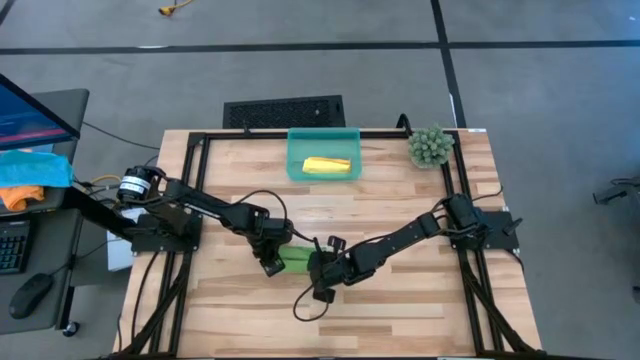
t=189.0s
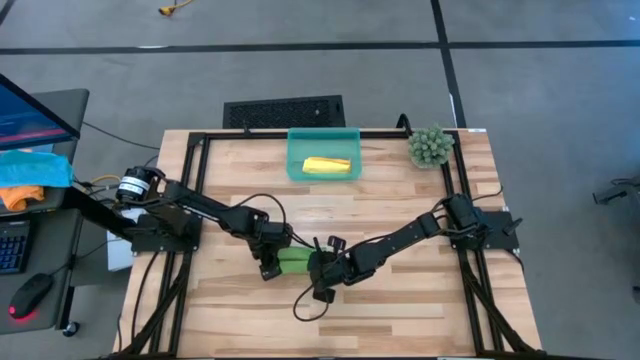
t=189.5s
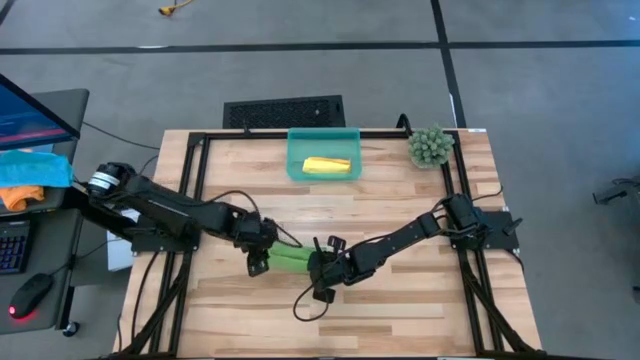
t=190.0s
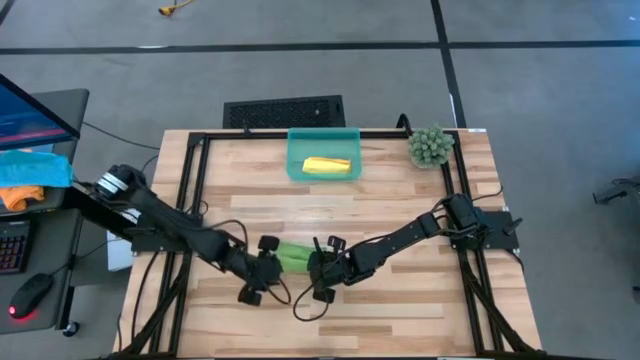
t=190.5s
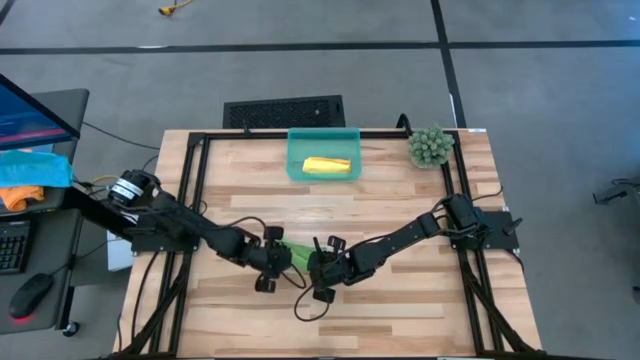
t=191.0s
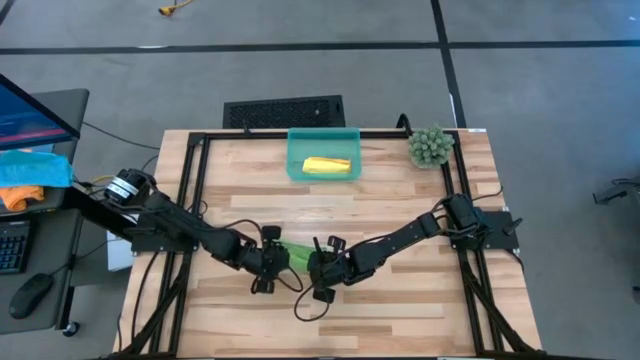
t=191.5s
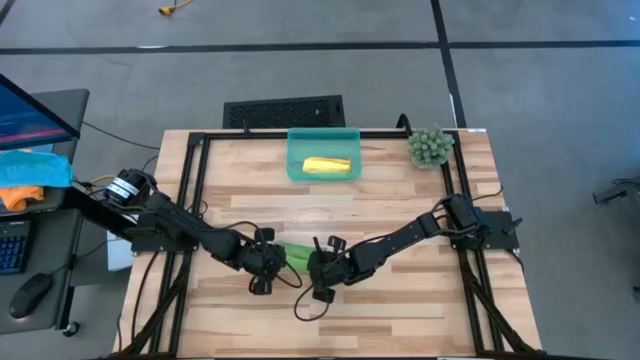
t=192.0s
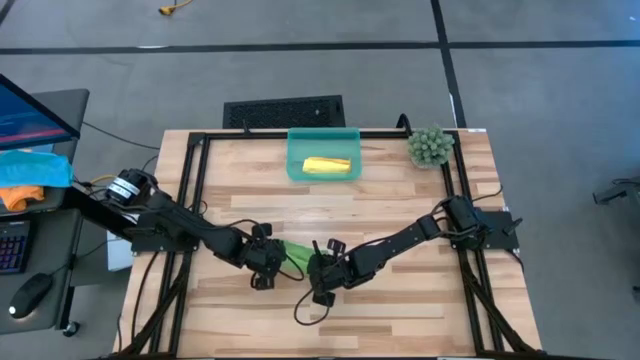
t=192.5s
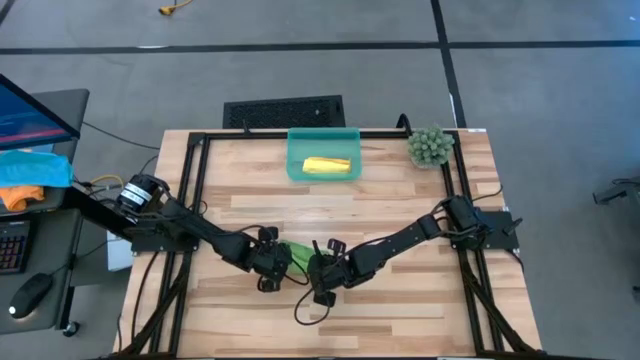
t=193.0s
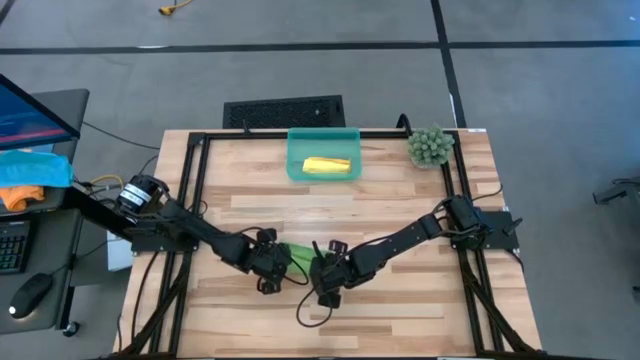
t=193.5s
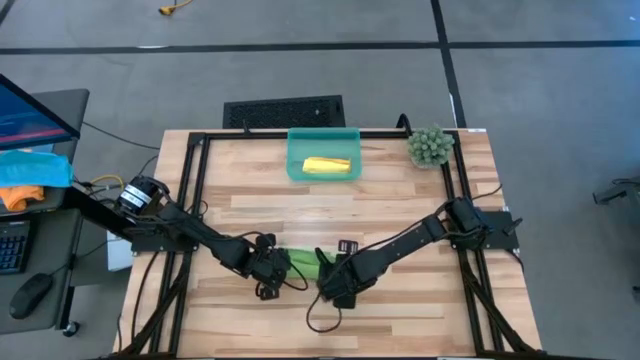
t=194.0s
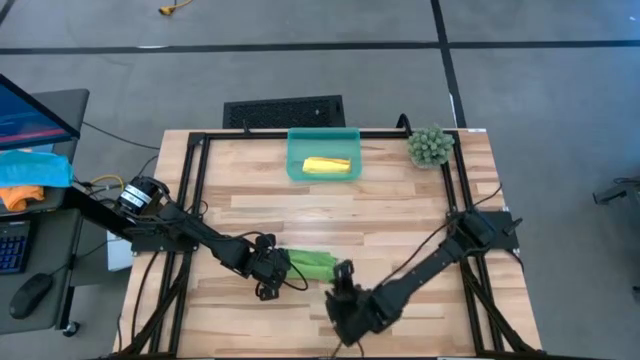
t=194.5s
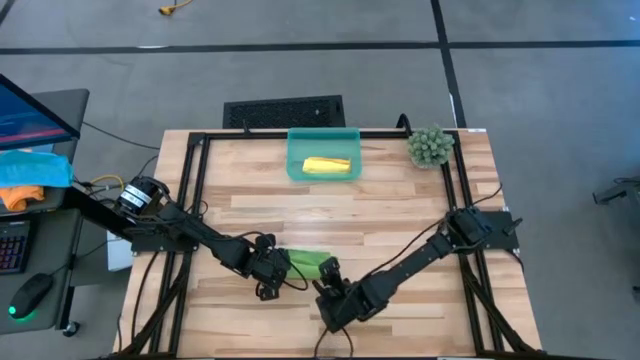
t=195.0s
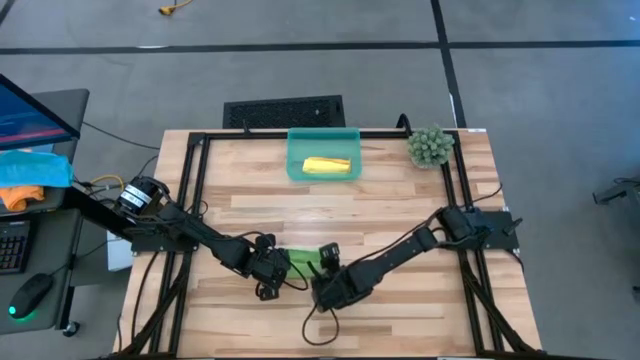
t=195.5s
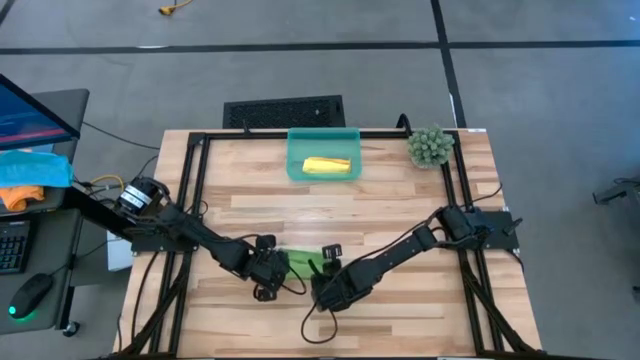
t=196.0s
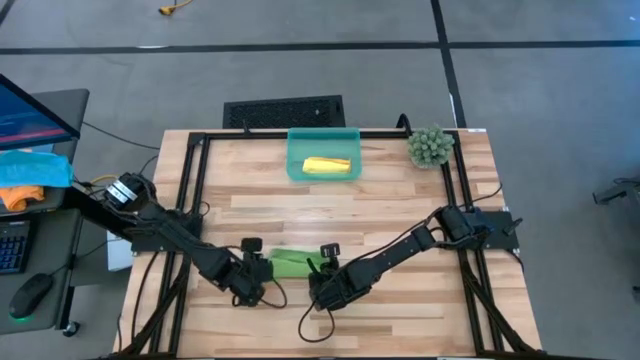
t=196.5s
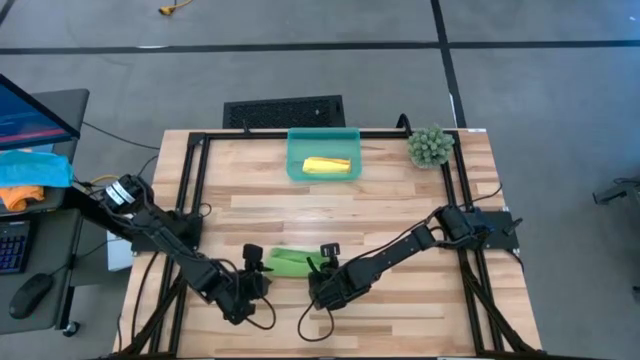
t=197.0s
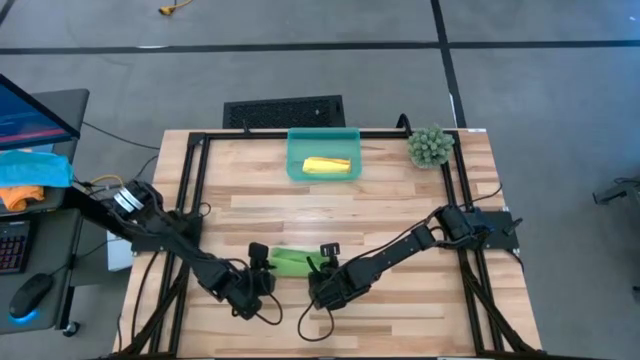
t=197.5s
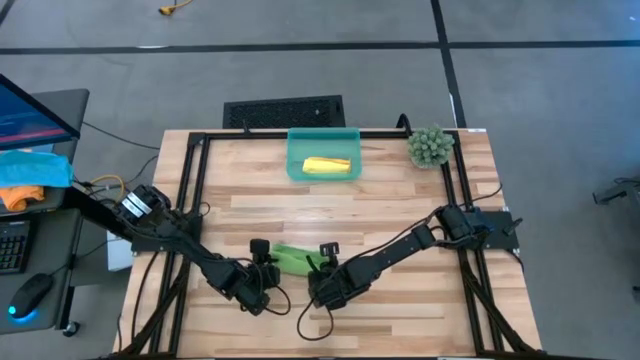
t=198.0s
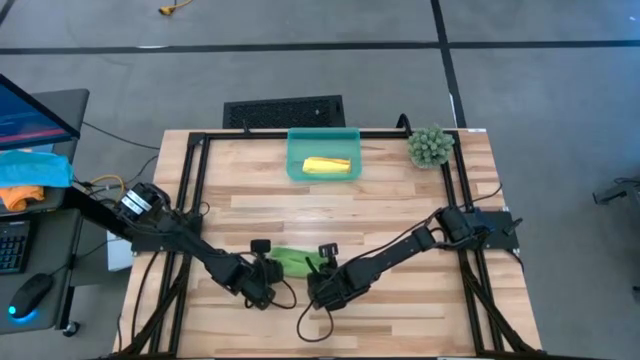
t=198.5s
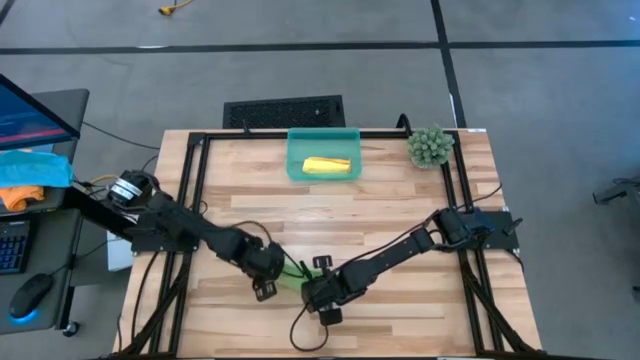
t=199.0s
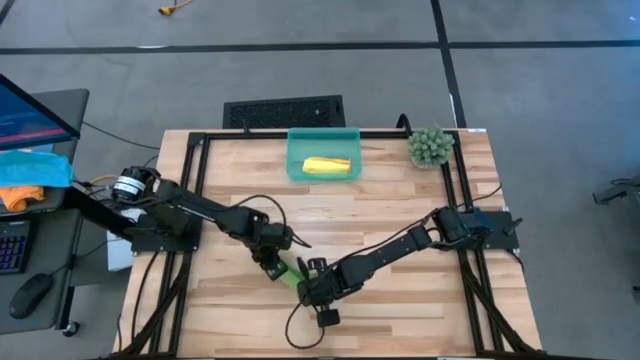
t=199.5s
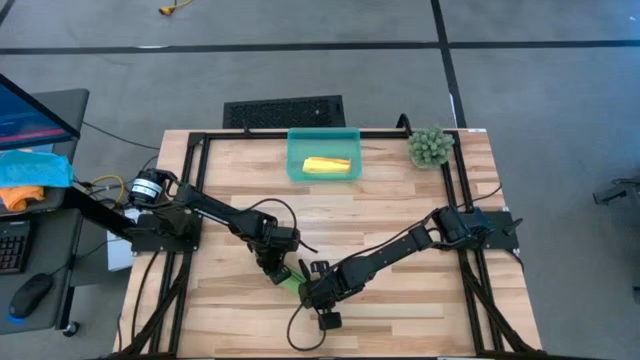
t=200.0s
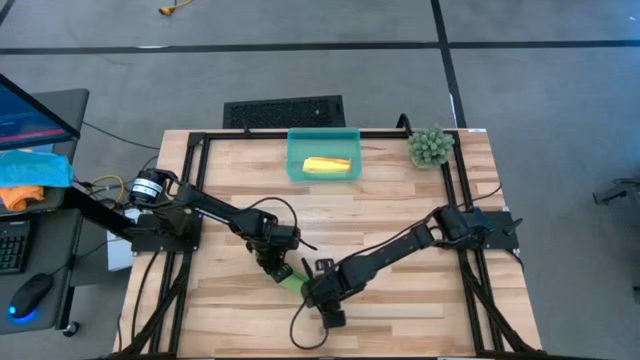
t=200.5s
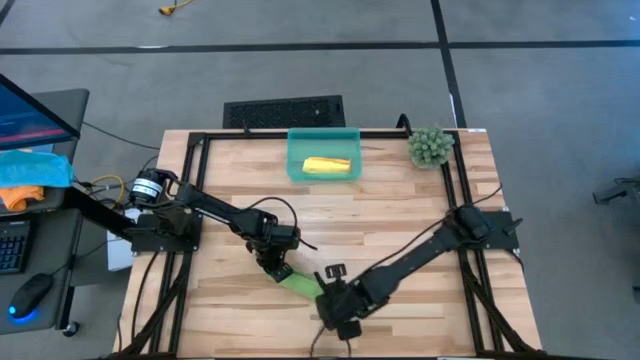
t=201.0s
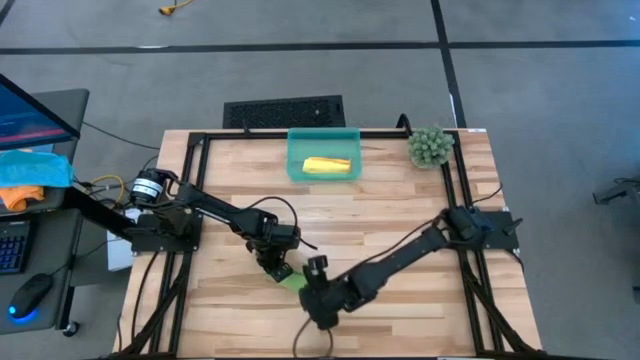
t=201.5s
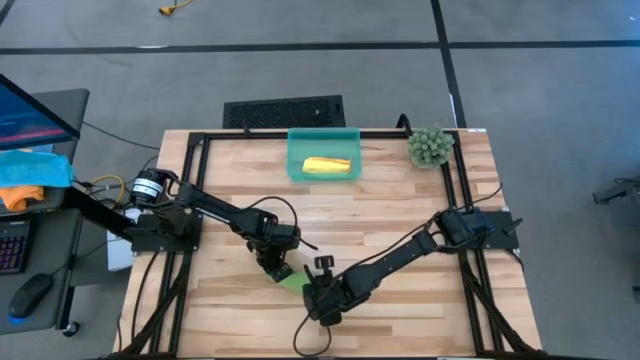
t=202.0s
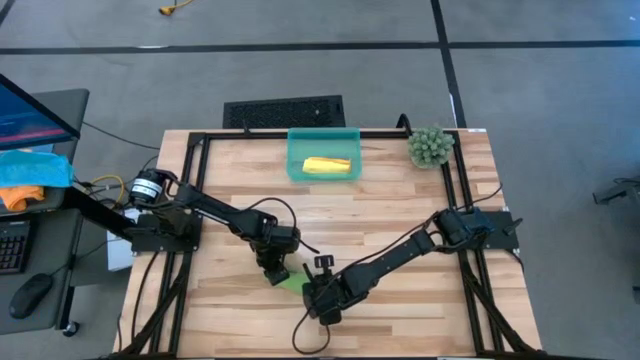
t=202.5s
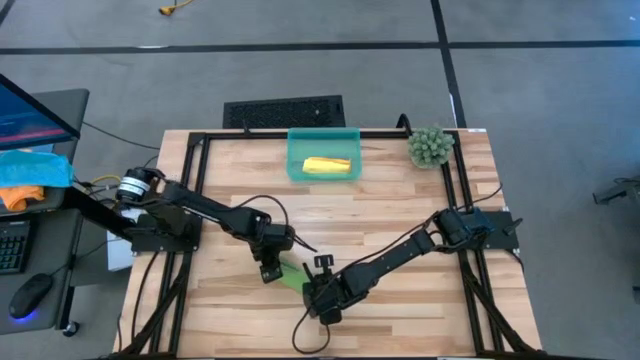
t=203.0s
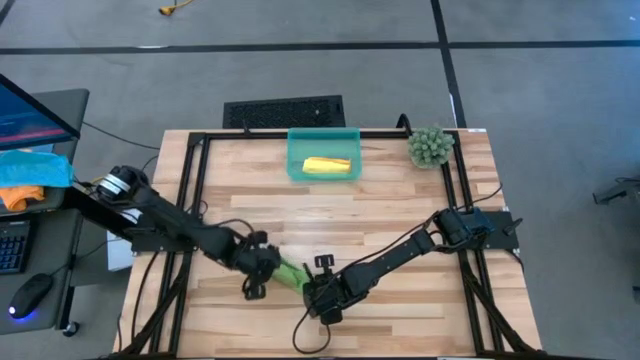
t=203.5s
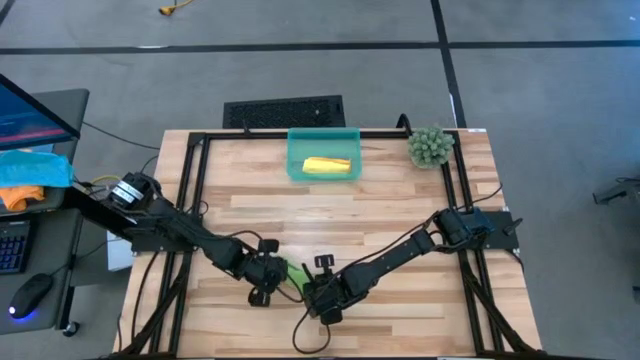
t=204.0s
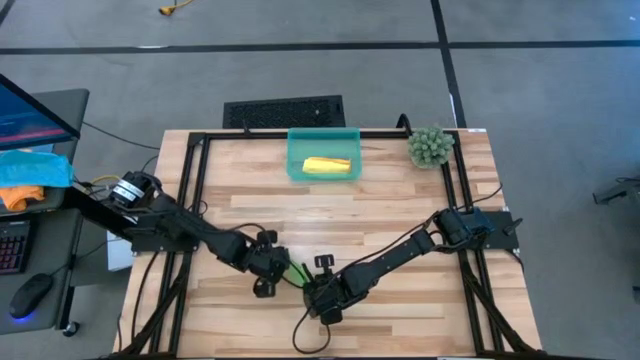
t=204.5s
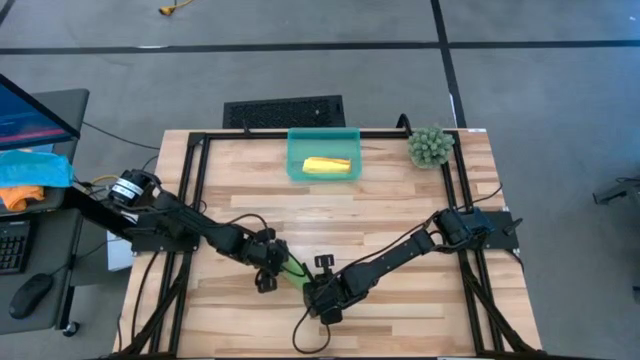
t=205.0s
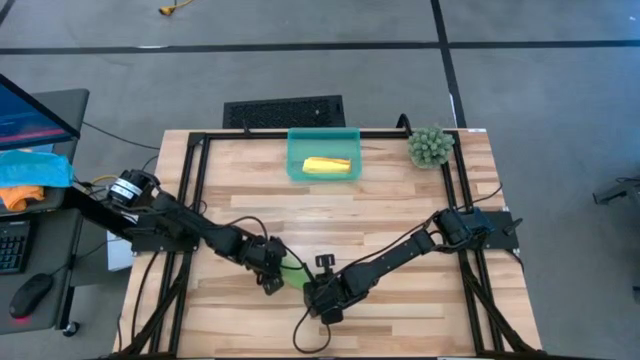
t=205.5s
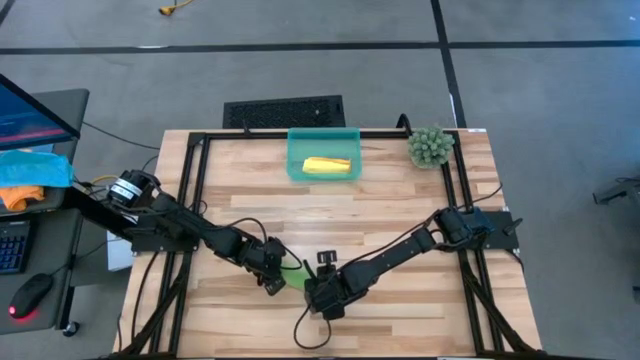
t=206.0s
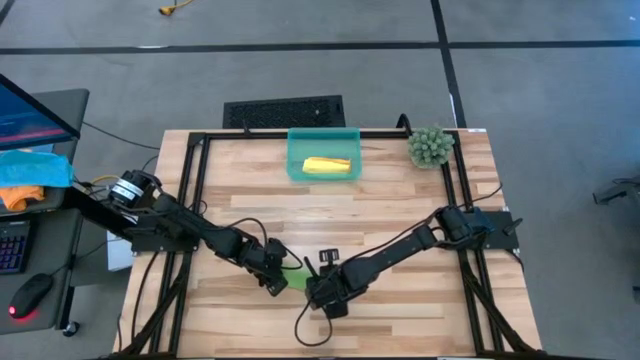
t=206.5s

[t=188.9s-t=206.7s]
Task: Roll microfiber towels into tight, uniform cylinder then place into a basket
Roll the green microfiber towel

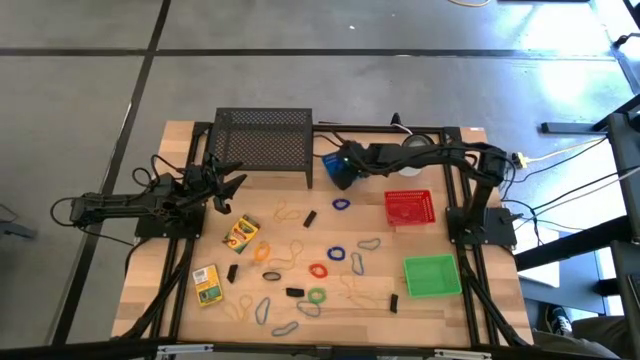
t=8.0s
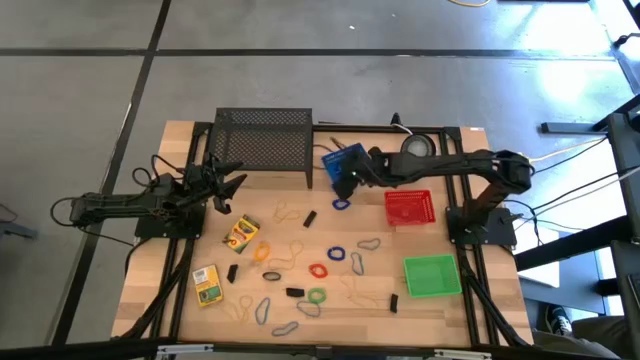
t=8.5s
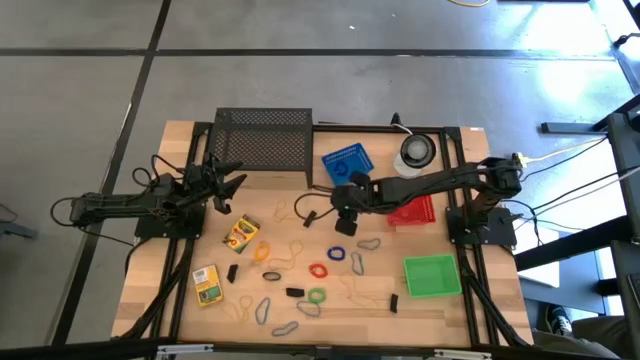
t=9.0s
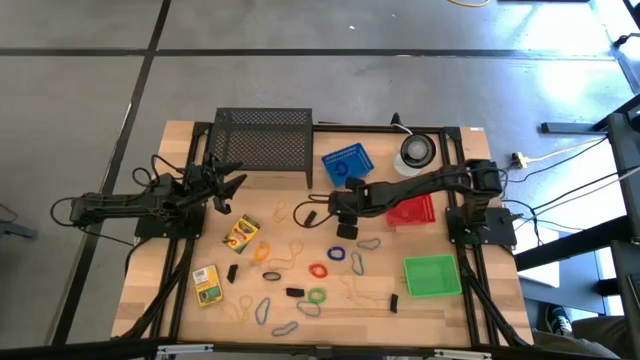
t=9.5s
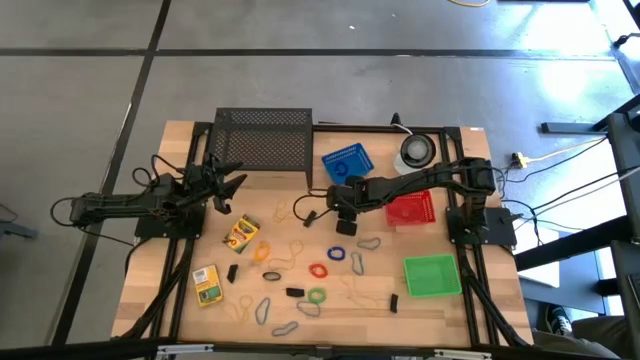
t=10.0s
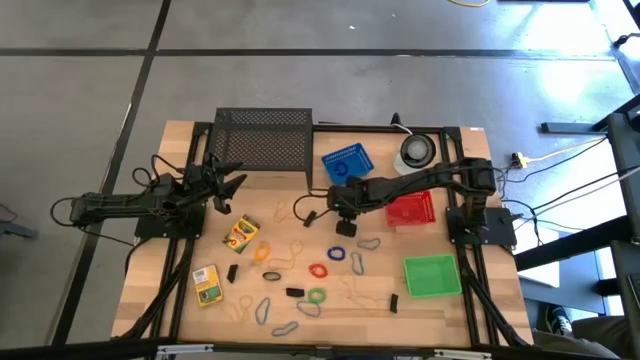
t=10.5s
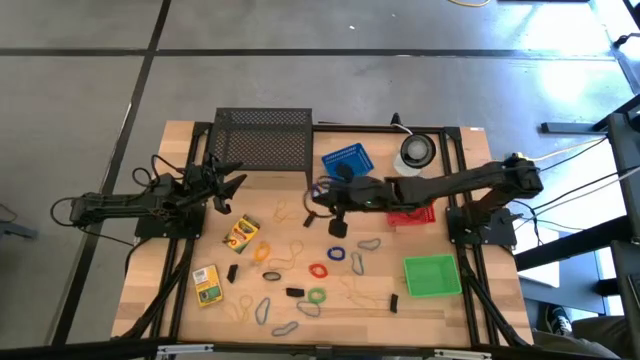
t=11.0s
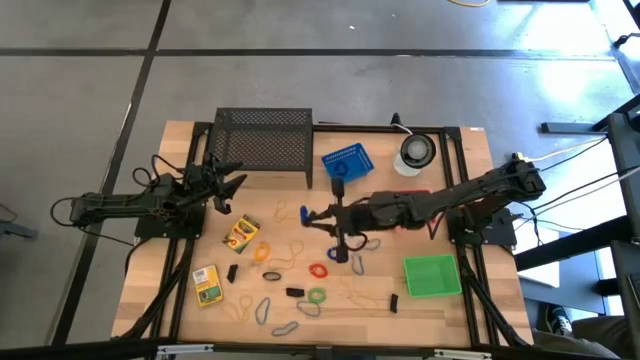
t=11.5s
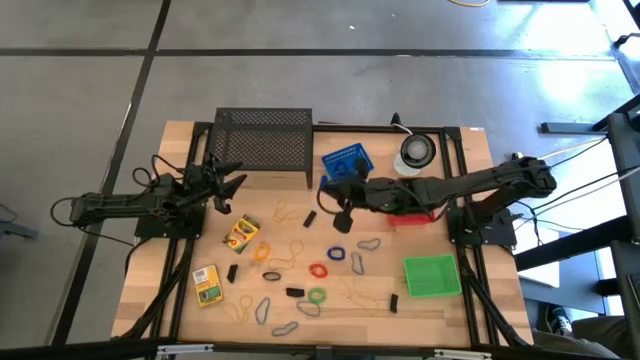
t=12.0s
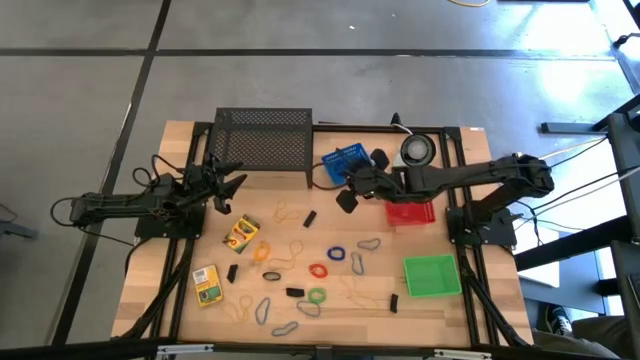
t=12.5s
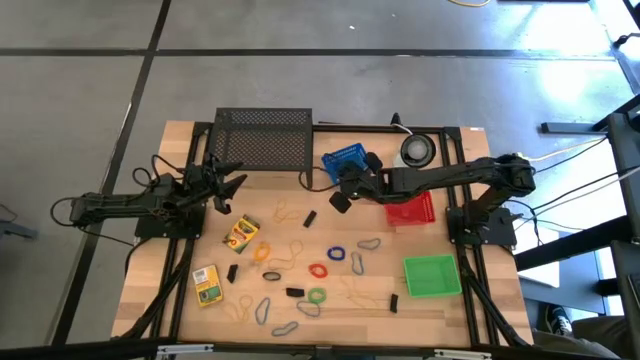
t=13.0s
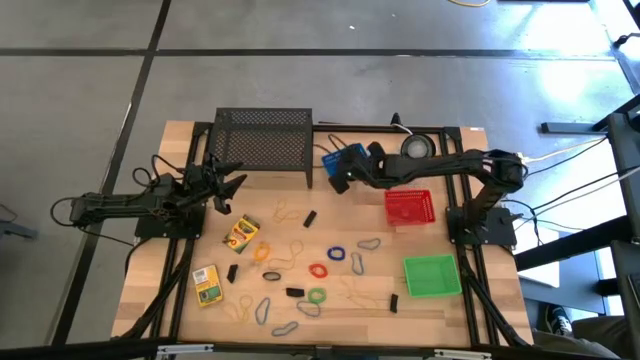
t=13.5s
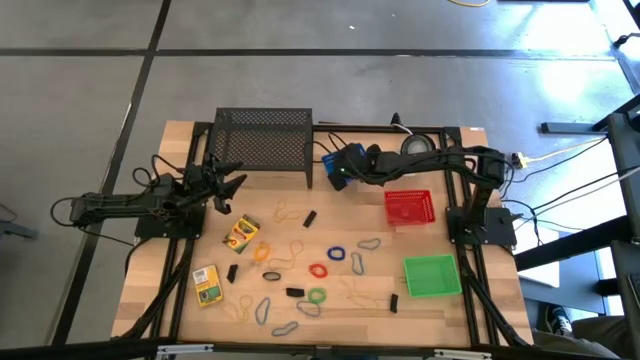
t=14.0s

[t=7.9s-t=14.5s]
Task: Pick & Place Office Desk Supplies
Put the blue wrist coil into the blue bin
